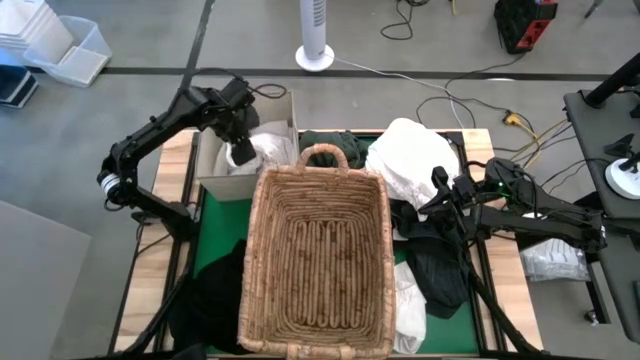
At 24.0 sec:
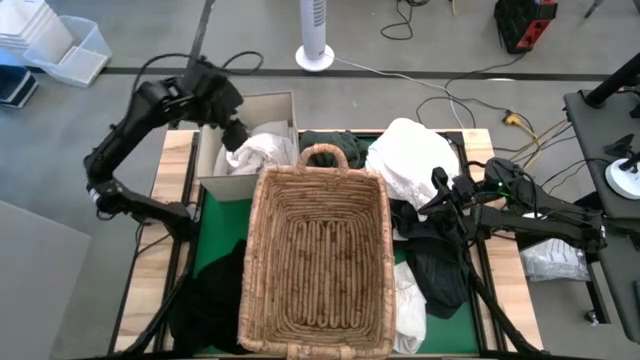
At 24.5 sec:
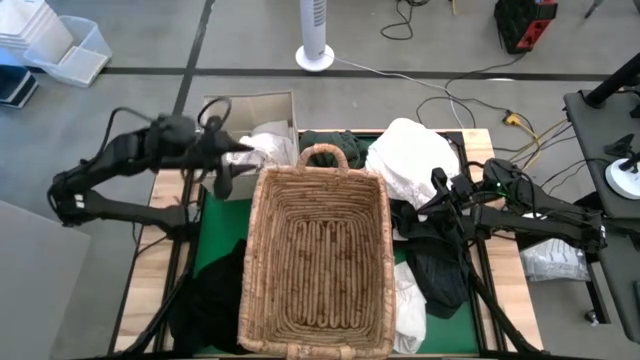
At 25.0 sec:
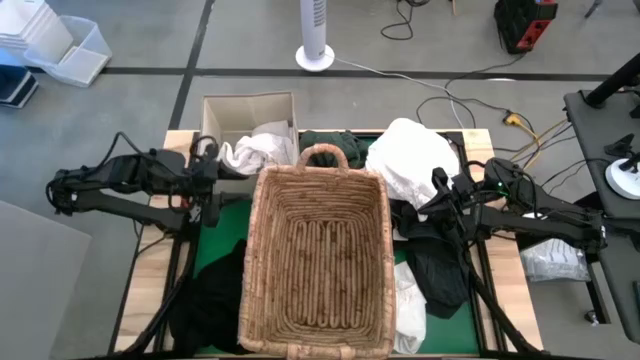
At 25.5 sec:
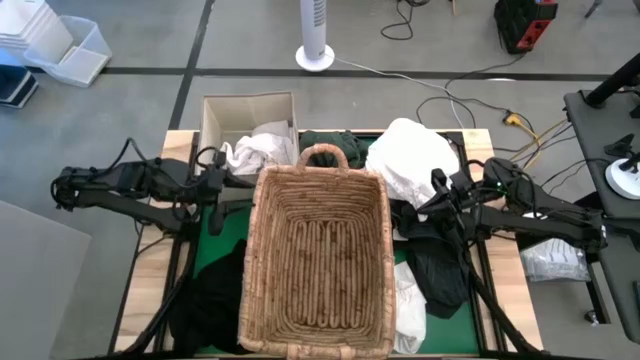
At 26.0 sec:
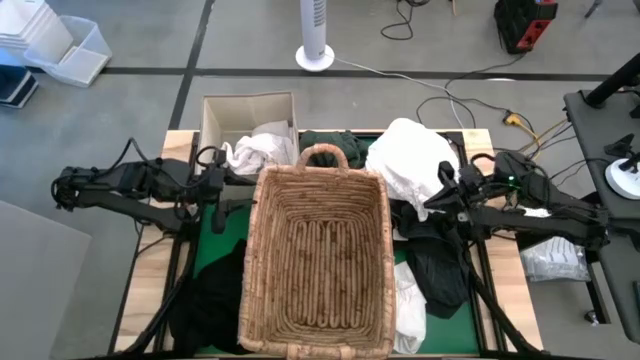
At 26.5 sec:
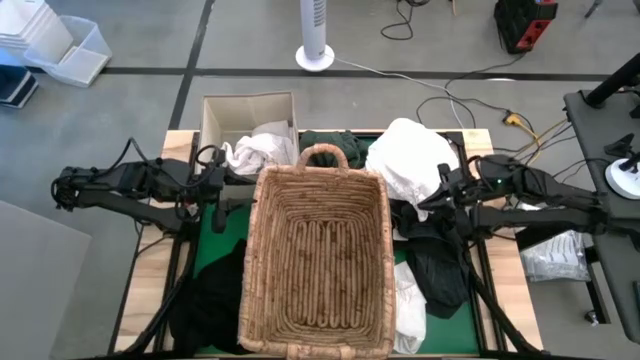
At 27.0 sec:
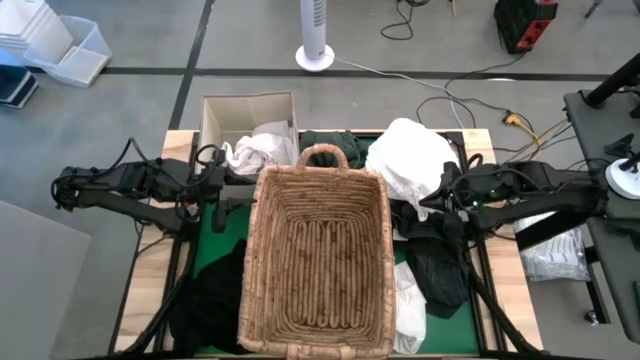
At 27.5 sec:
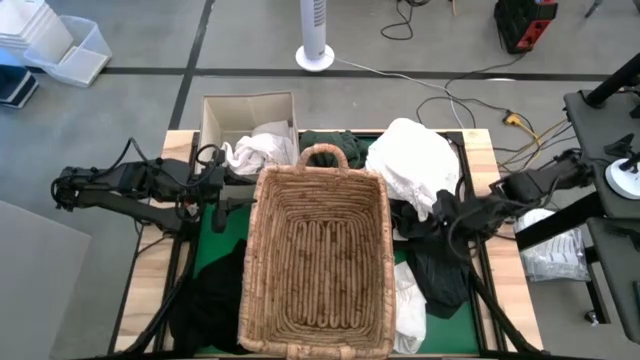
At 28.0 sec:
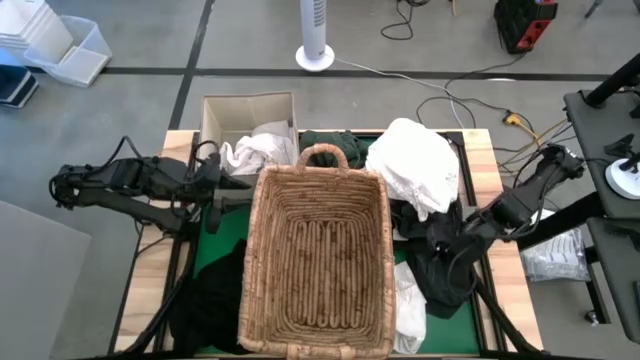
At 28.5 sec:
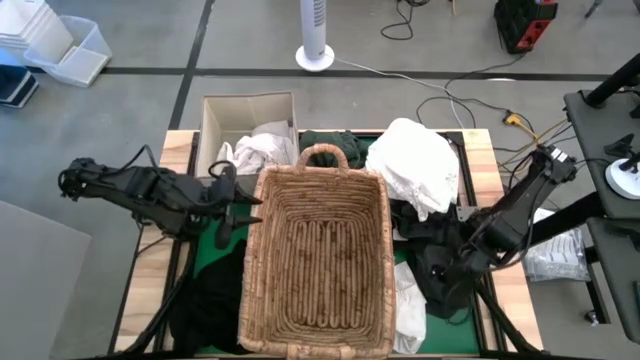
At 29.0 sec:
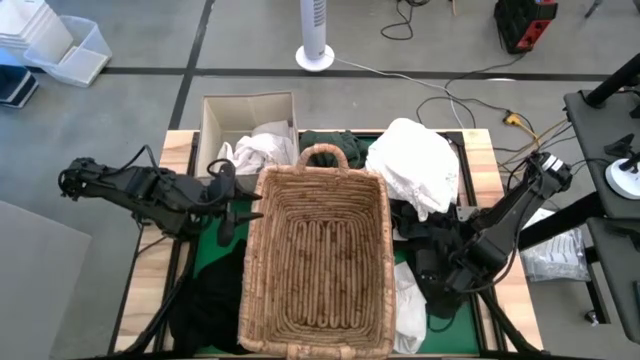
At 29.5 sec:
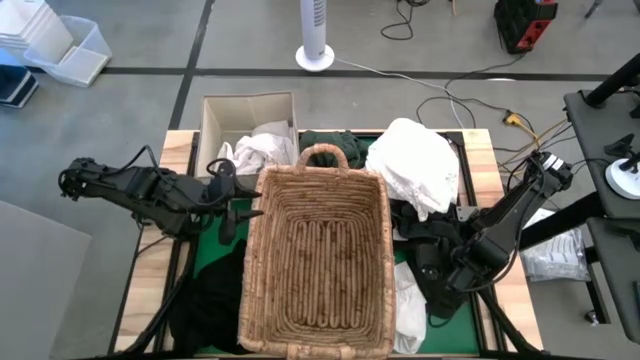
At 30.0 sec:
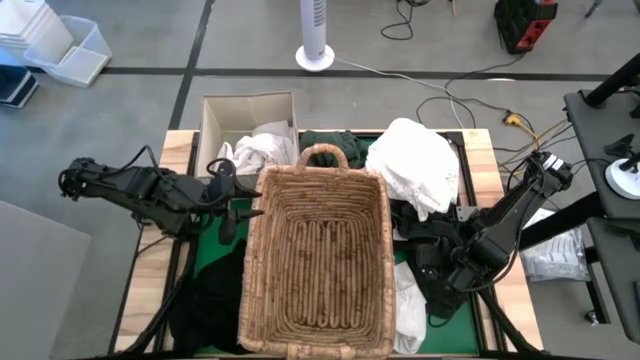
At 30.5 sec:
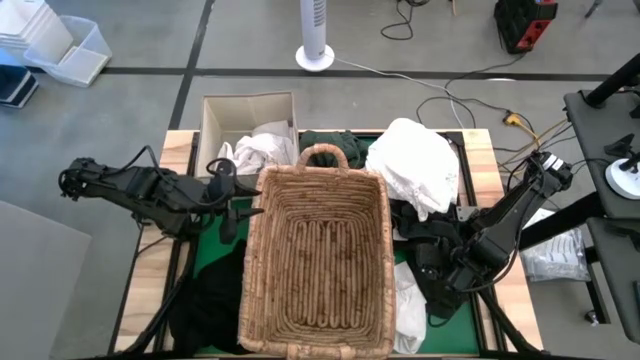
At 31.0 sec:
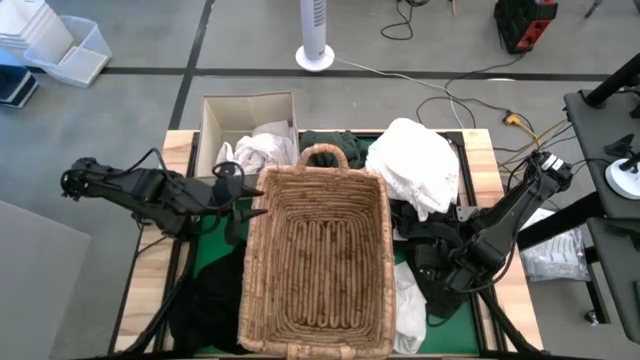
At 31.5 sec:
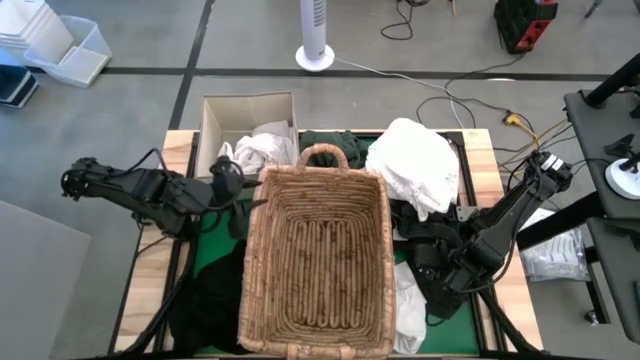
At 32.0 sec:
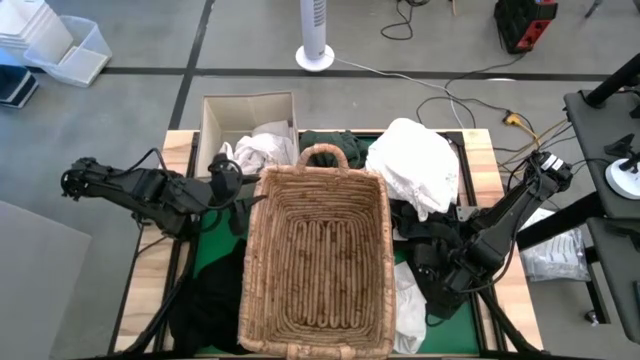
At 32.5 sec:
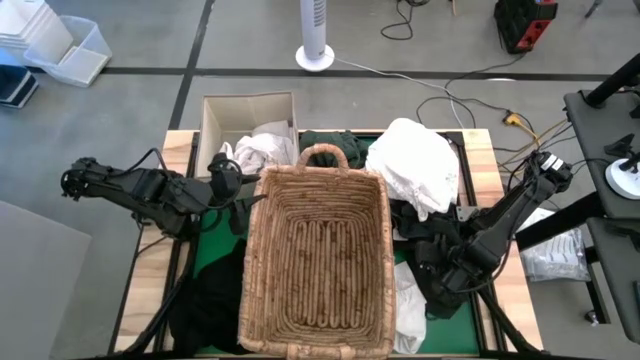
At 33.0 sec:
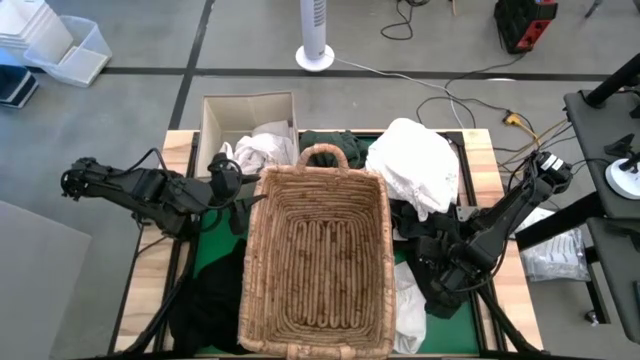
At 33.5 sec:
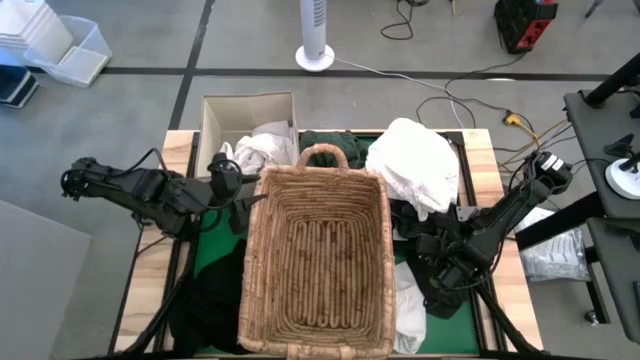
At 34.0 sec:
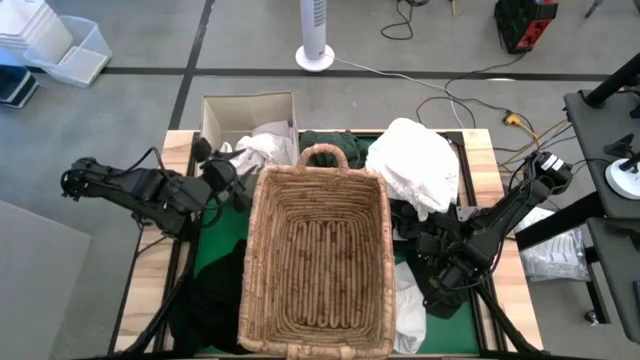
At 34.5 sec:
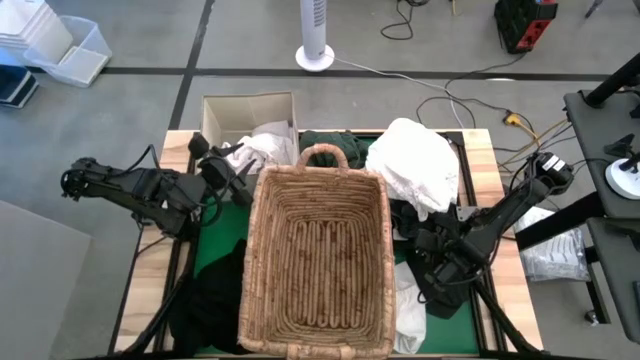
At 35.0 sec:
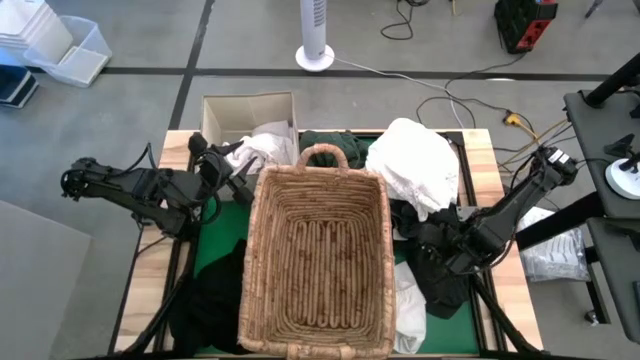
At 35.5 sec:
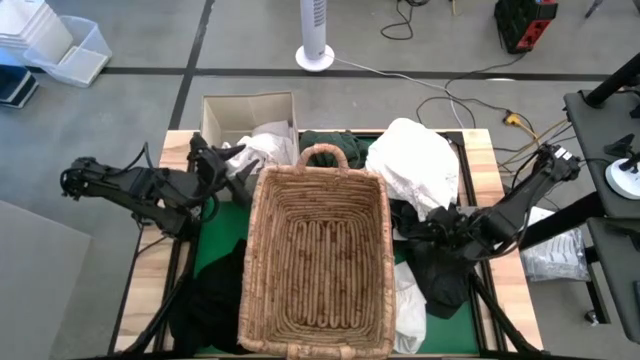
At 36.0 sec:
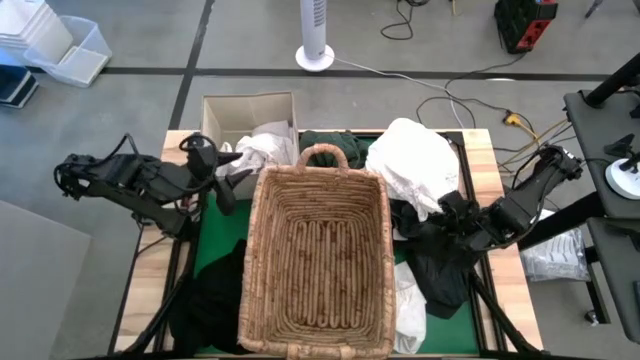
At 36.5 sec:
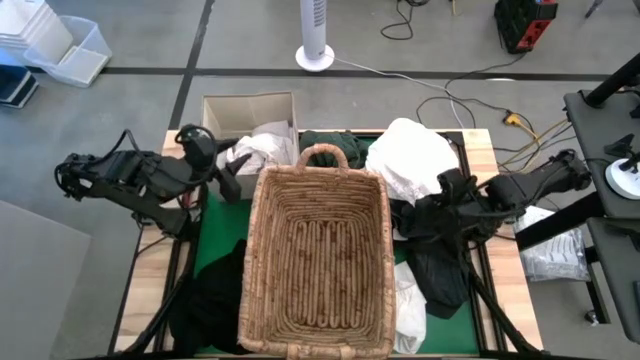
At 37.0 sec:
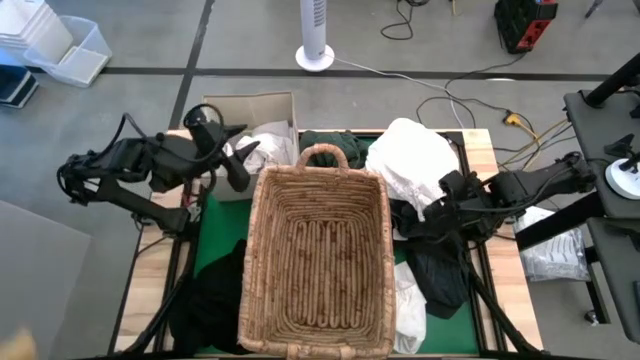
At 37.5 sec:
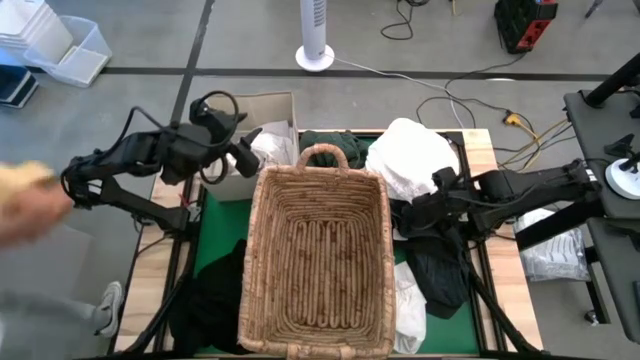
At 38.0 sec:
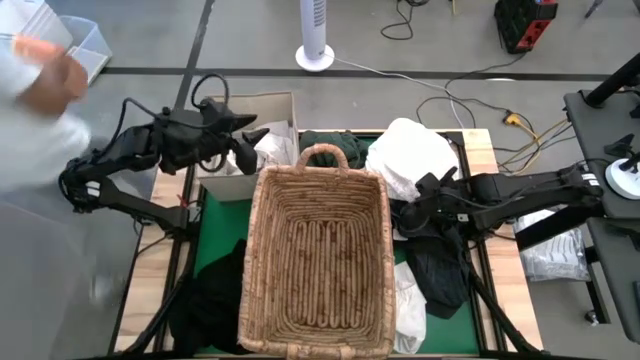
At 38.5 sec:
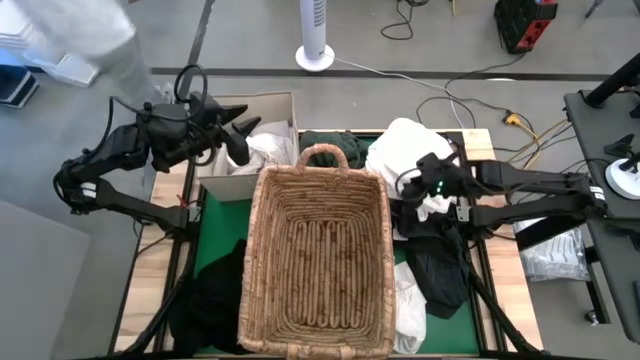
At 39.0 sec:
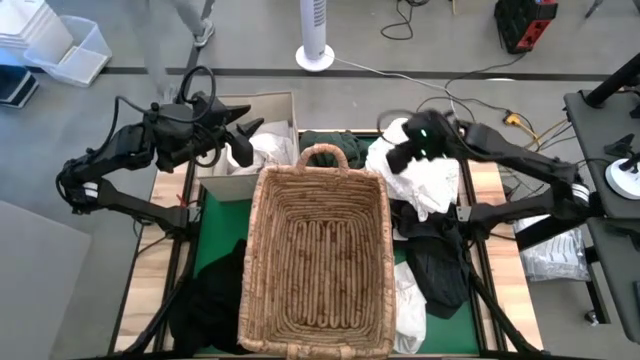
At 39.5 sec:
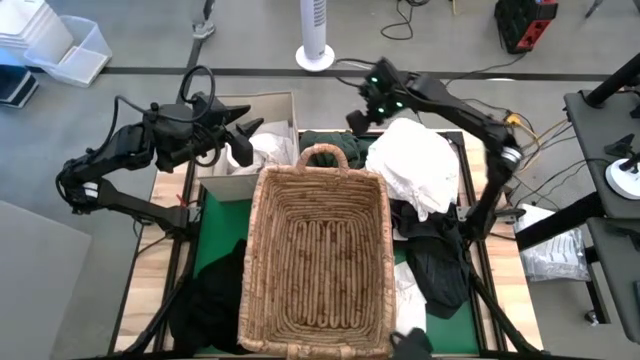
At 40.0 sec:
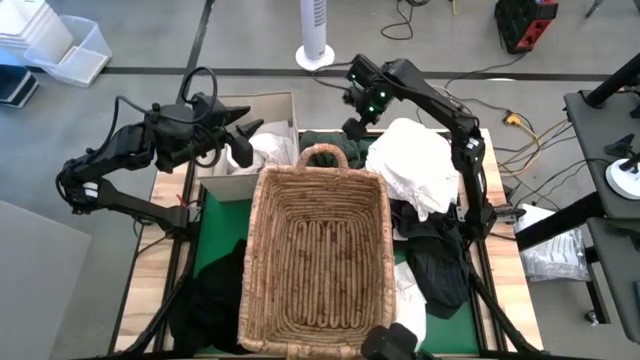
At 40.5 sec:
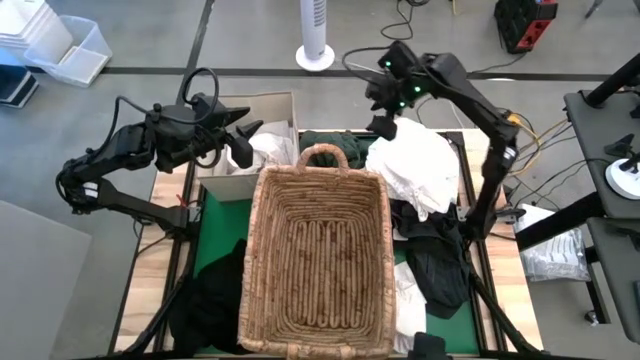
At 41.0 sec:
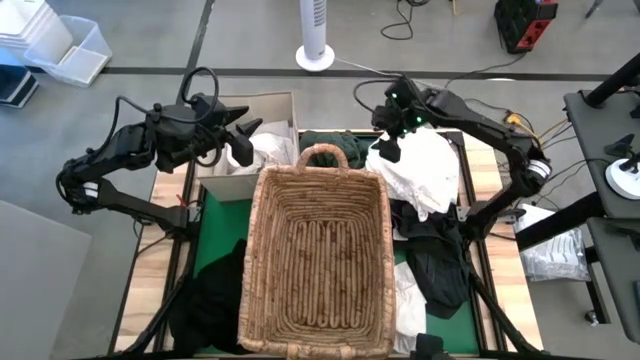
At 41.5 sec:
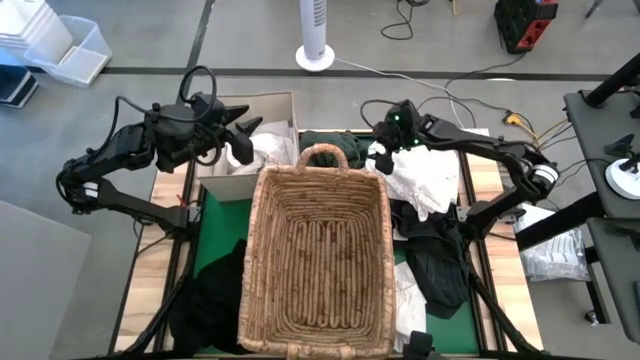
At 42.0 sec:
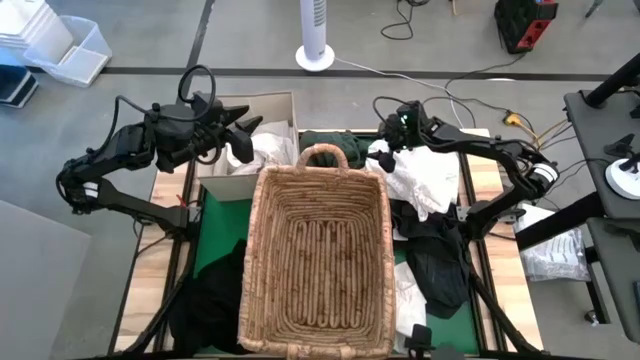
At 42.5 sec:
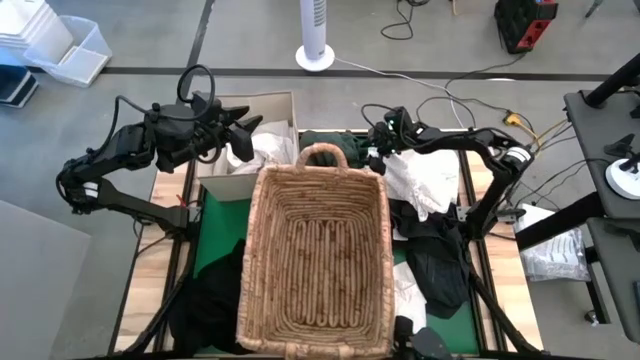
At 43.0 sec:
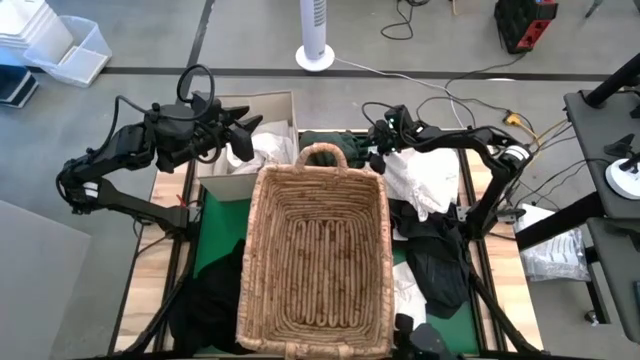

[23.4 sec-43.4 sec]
Put the green shirt into the brown basket
